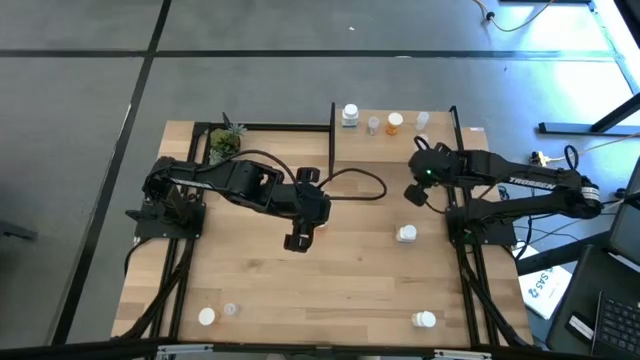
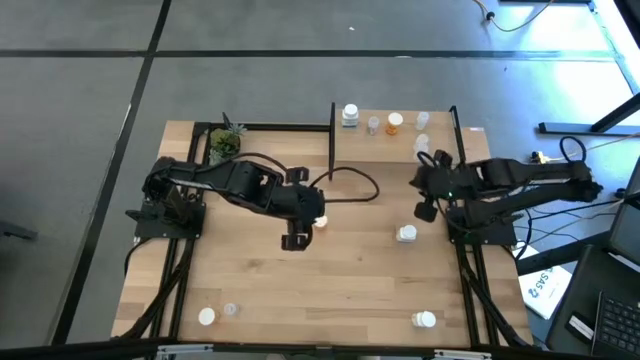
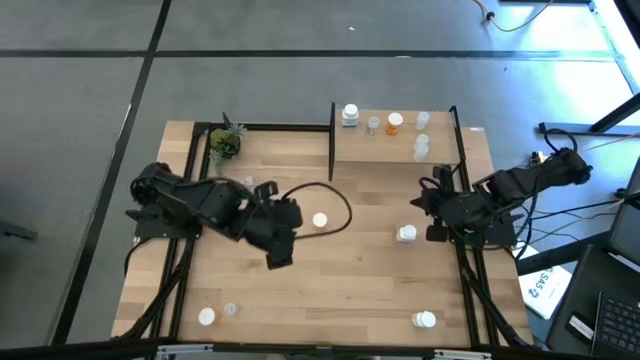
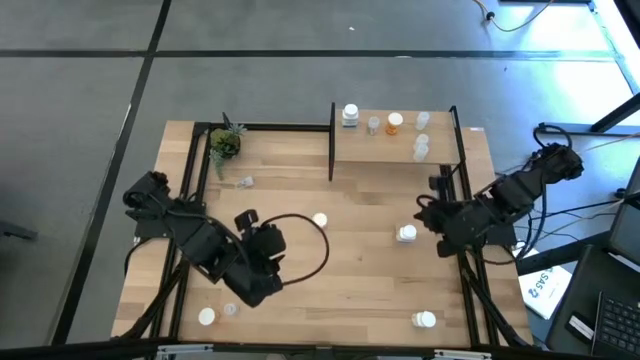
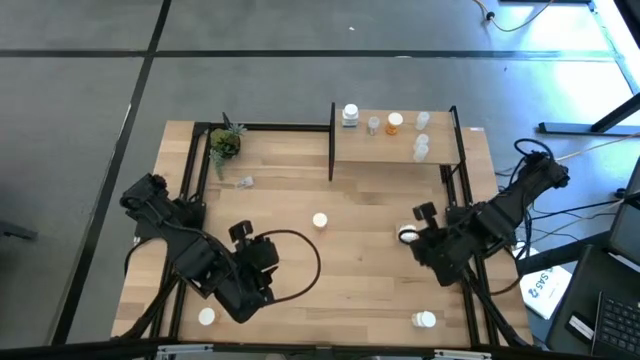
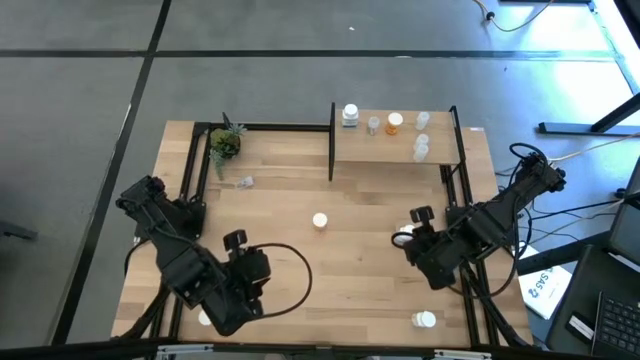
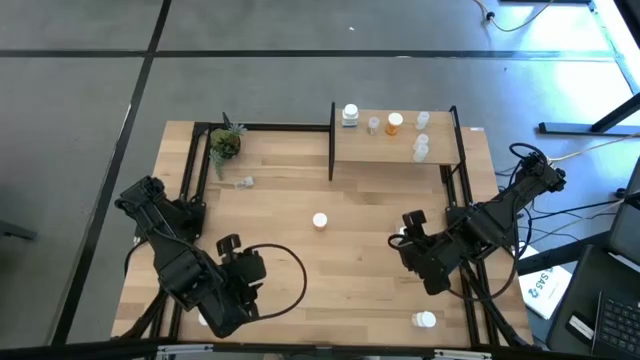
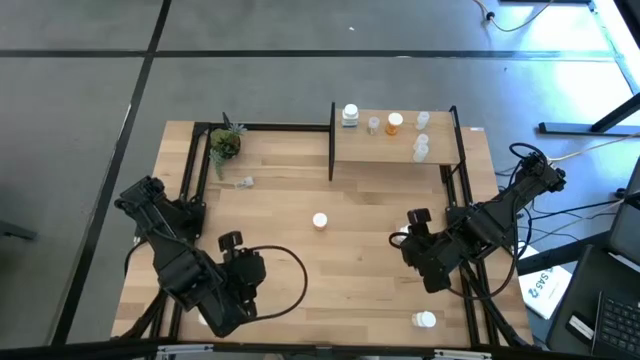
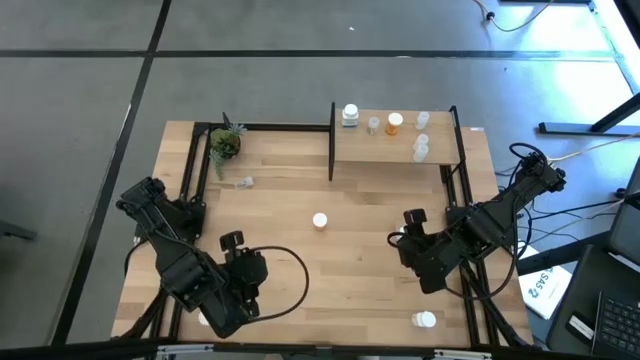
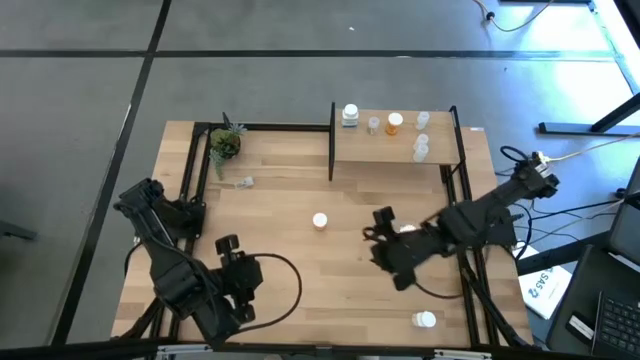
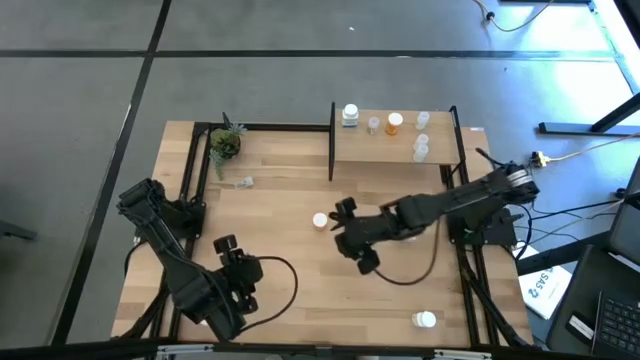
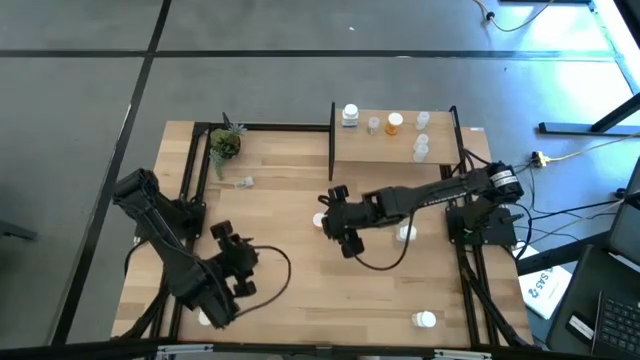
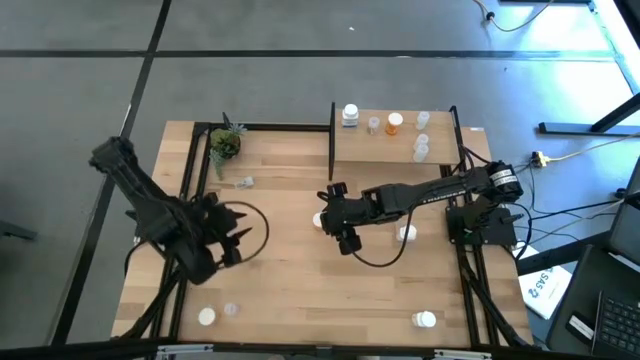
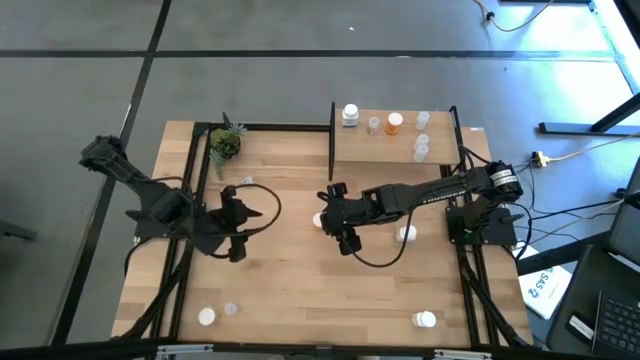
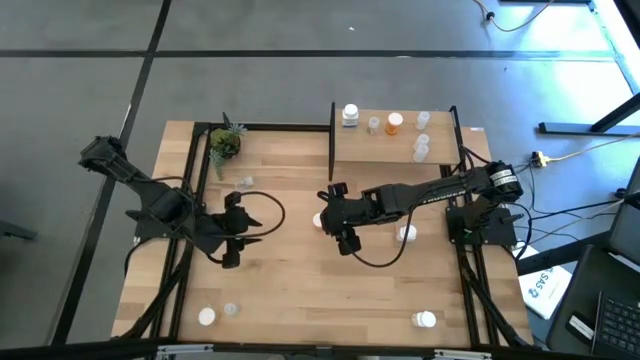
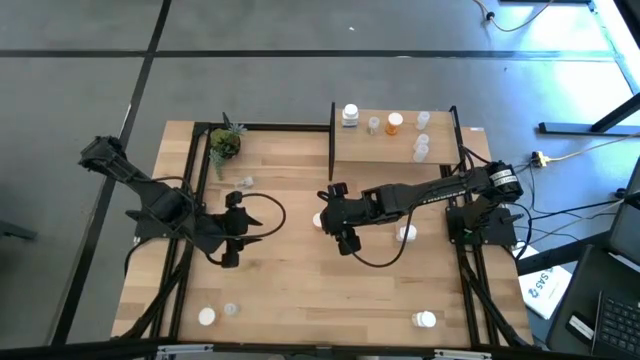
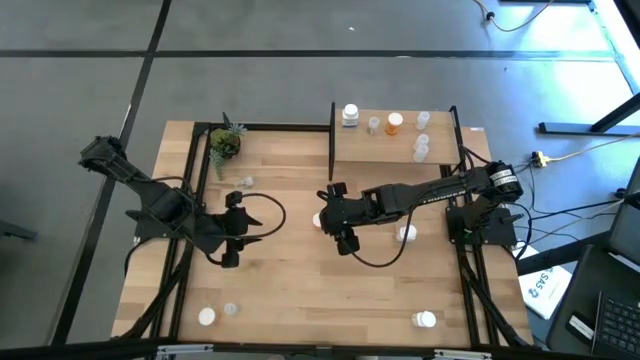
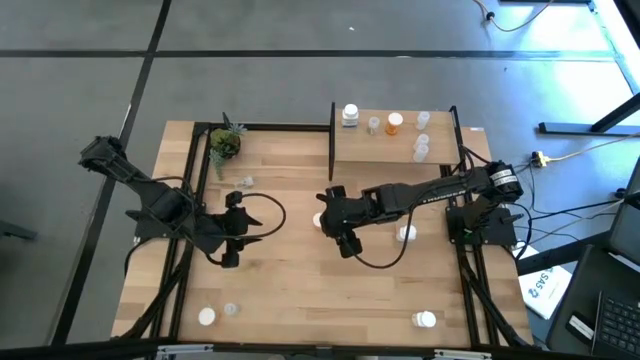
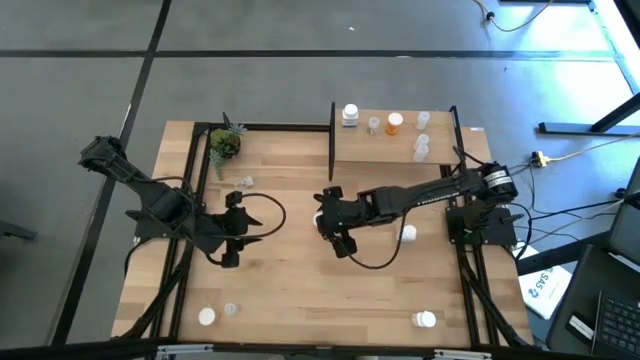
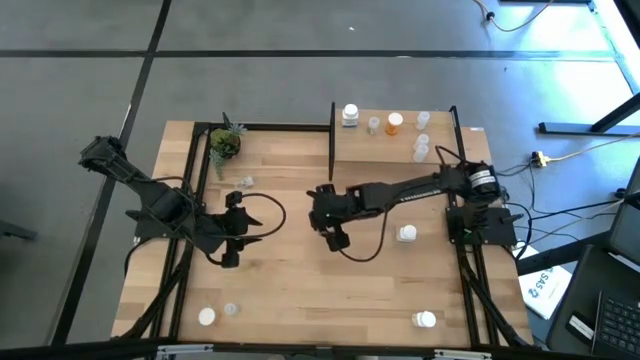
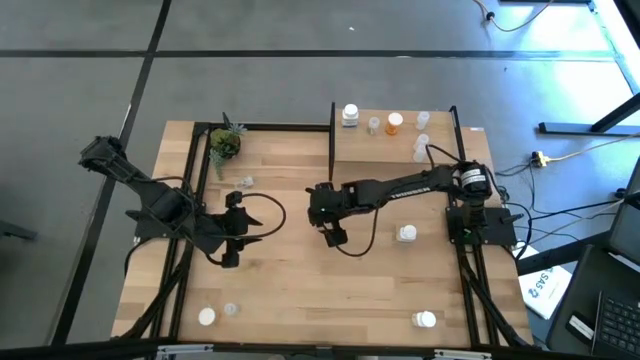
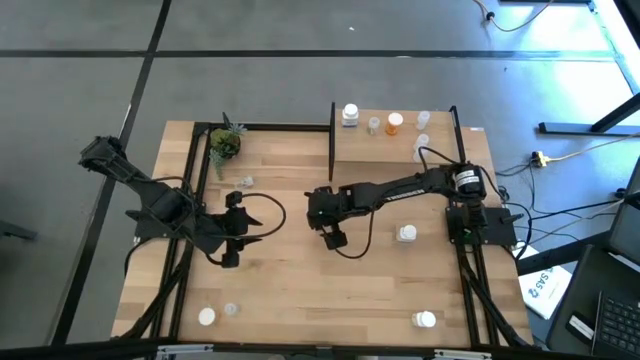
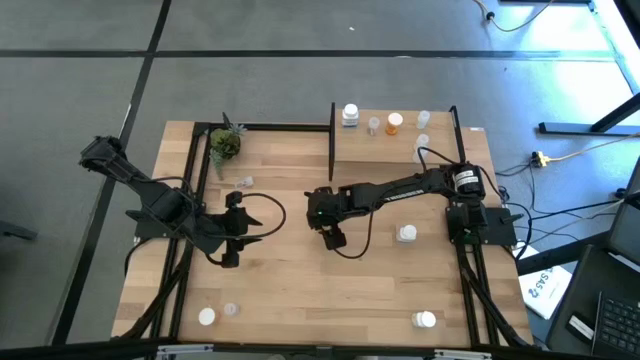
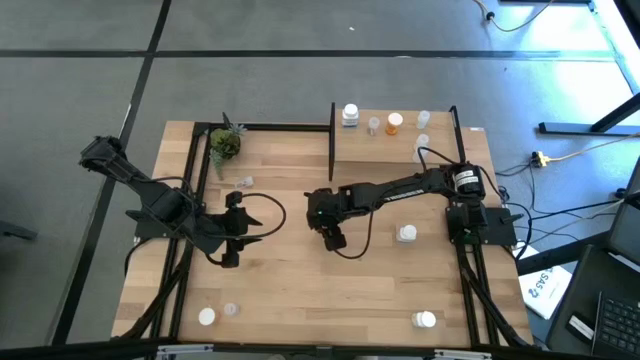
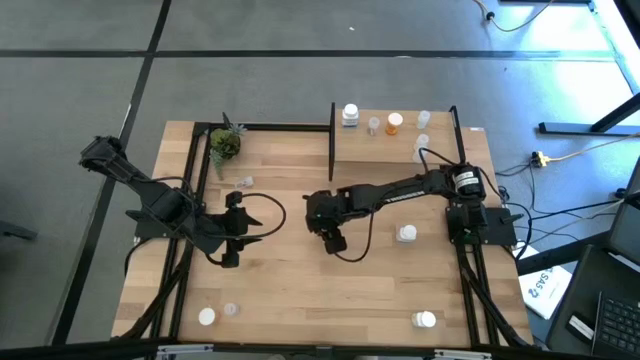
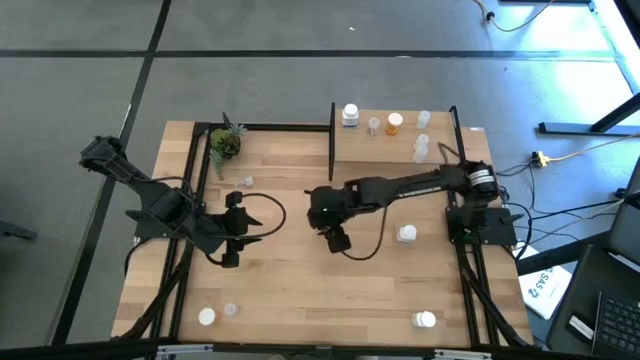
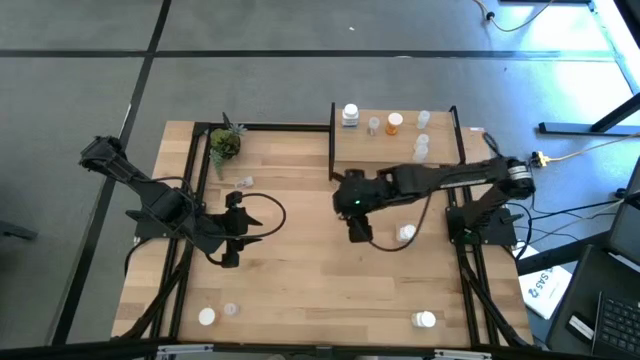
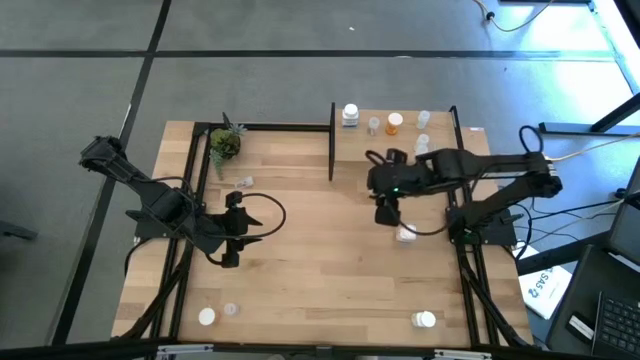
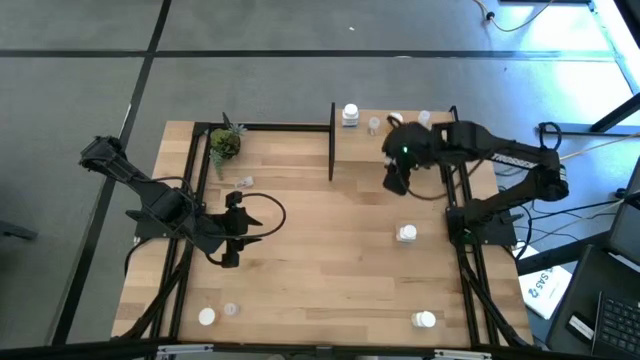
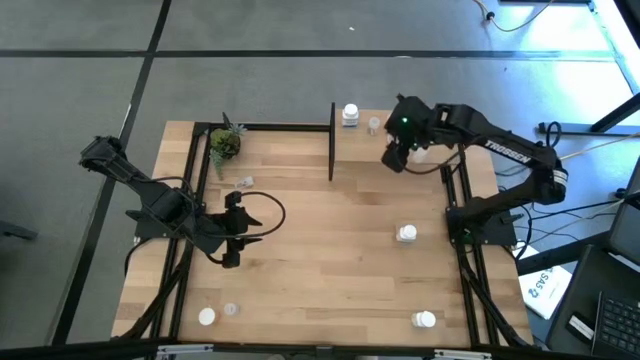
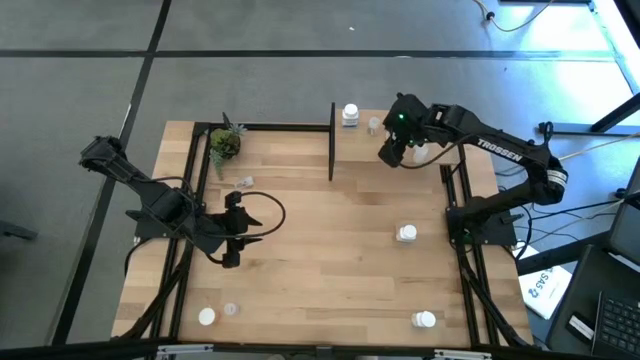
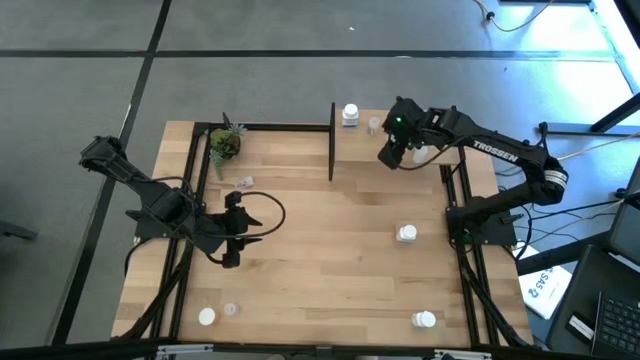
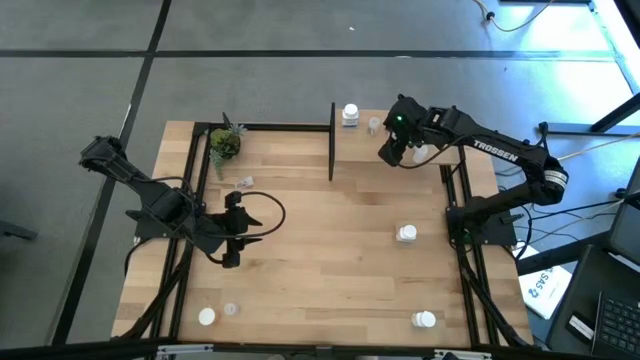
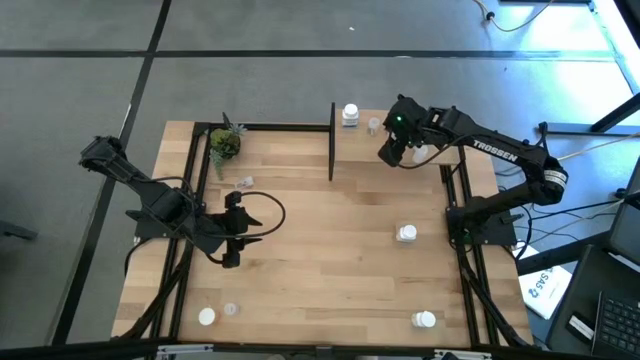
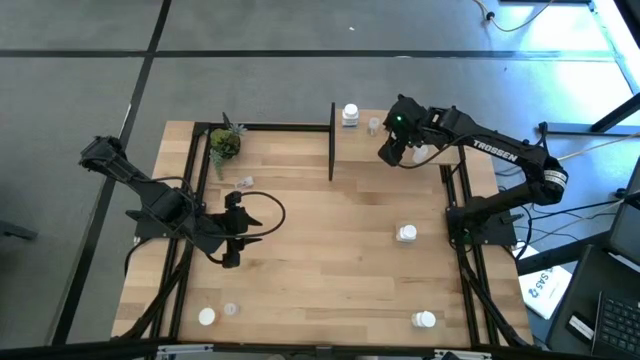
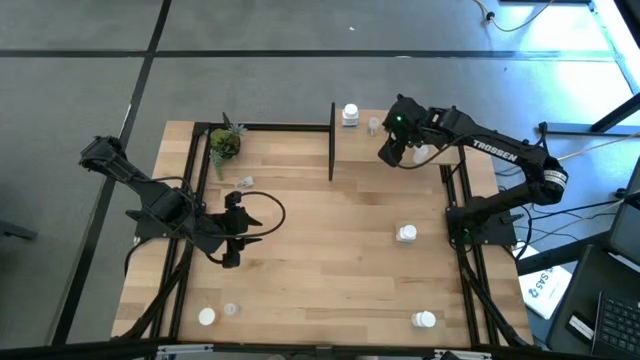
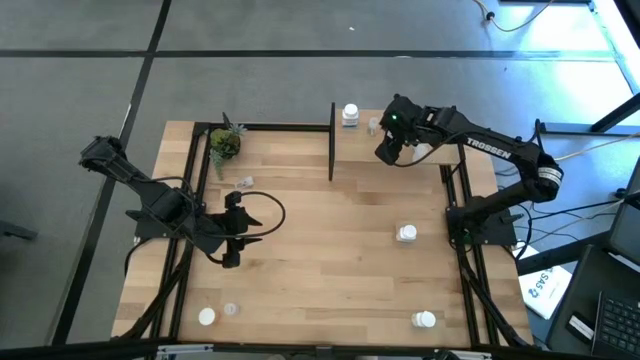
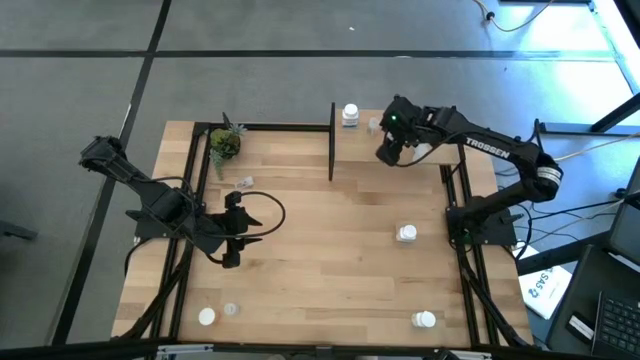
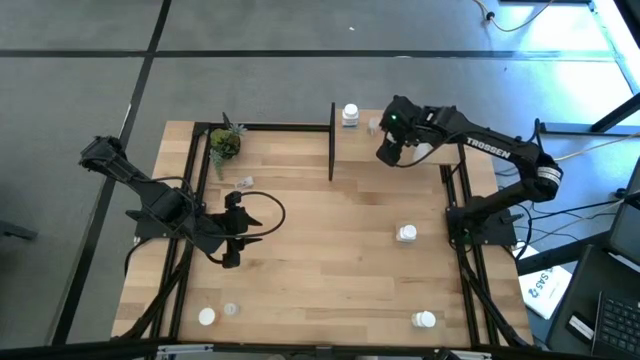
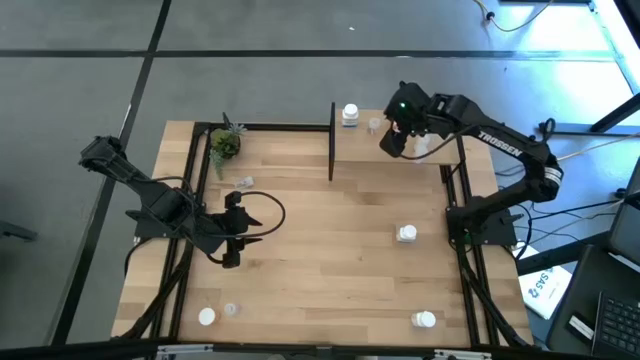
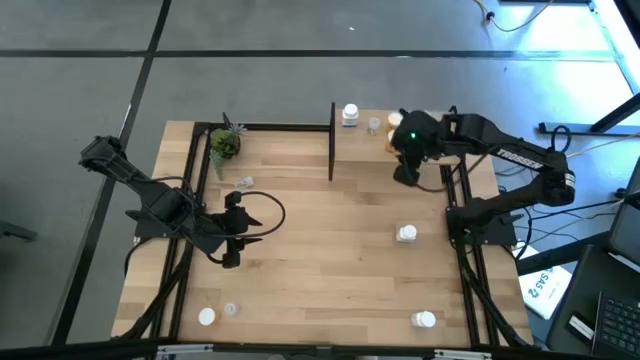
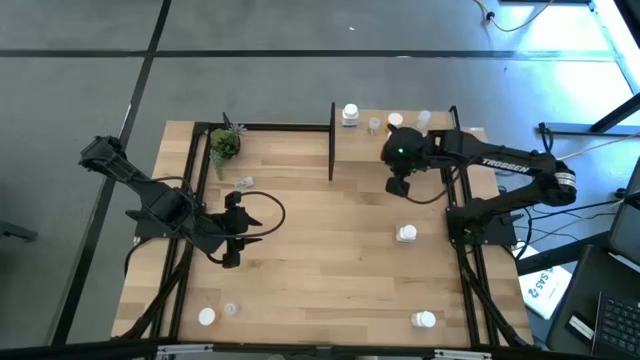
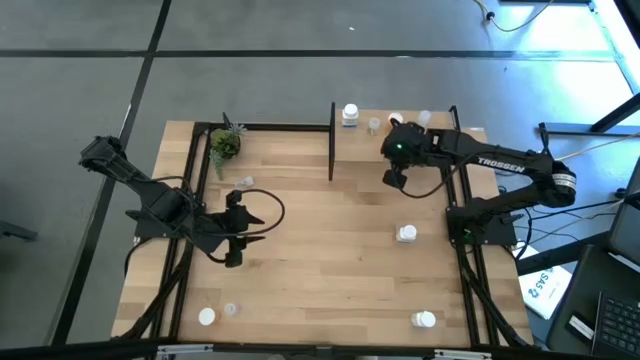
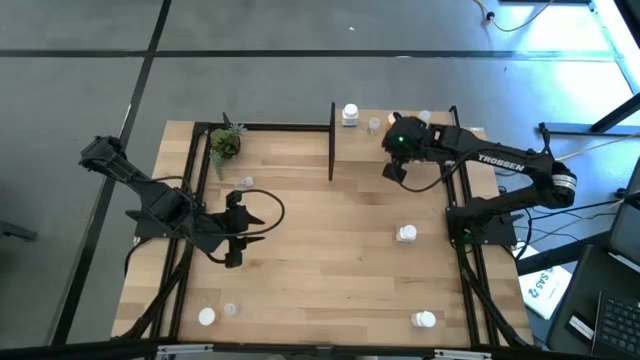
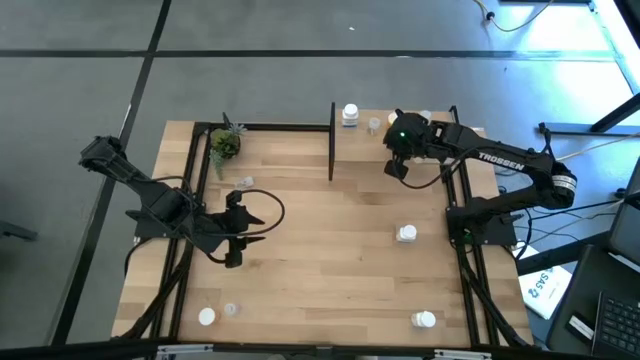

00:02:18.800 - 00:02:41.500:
Task: Pick and place medicine bottles onto shelf by color
Put the top orange pill bottle on the shelf aligned with the other orange pill bottle
